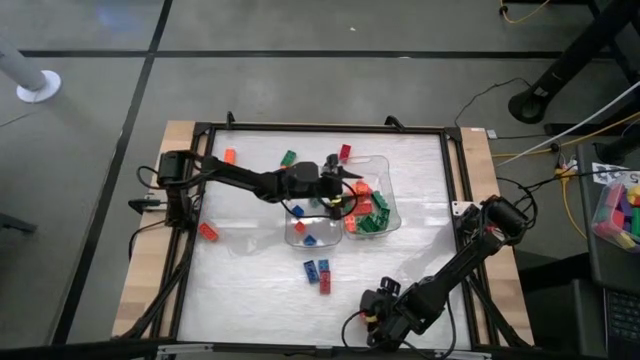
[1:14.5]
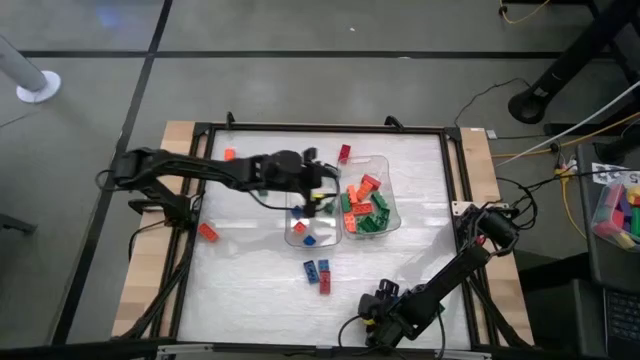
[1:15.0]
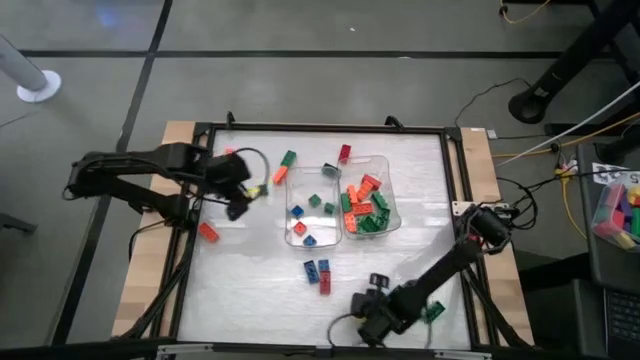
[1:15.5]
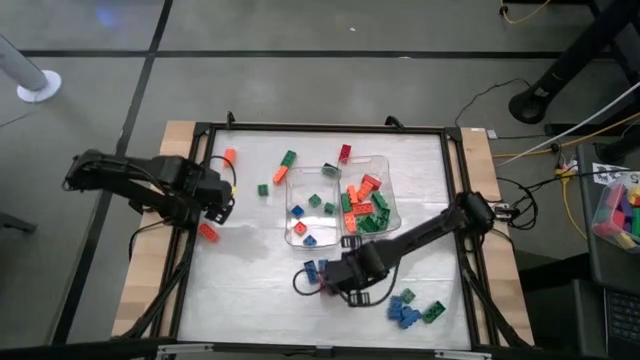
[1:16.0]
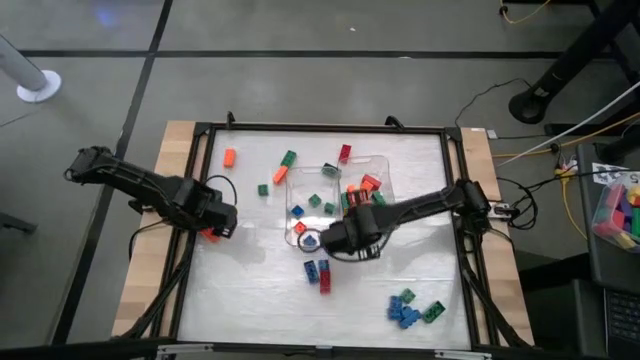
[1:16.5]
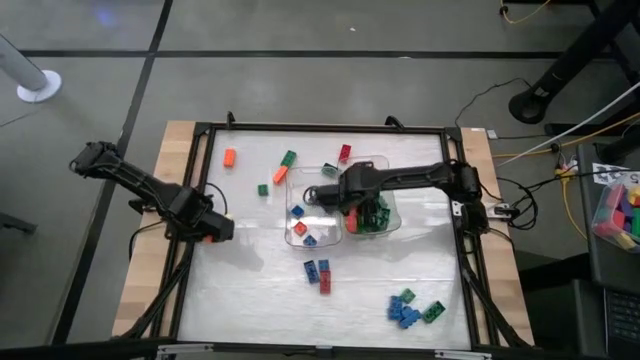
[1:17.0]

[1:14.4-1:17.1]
Task: Sort blocks by size
Put the orange rectangular game piece into the right transparent bin

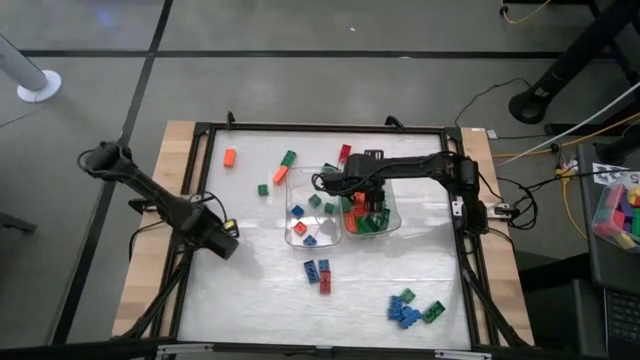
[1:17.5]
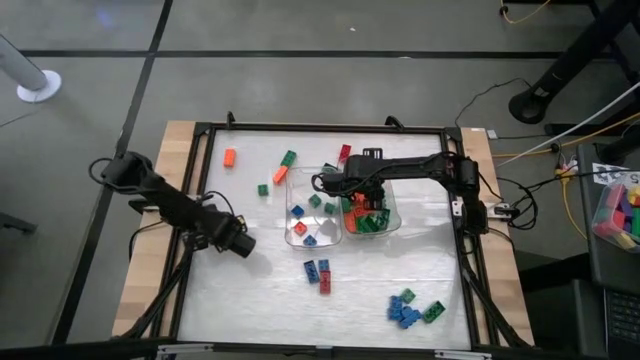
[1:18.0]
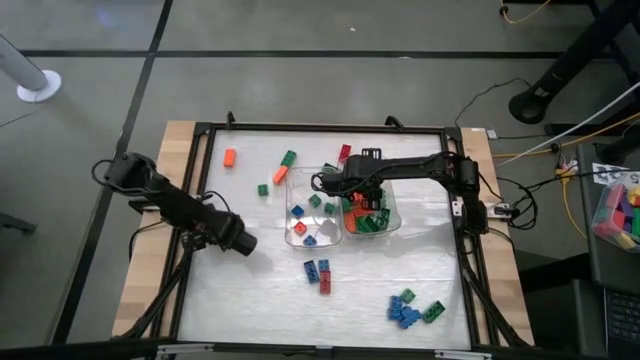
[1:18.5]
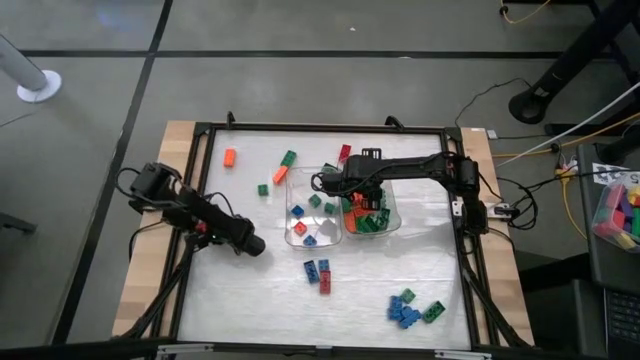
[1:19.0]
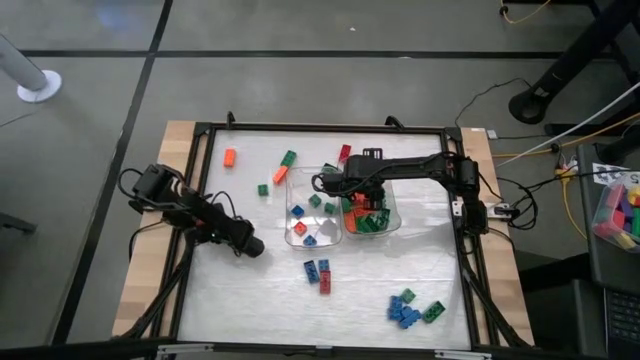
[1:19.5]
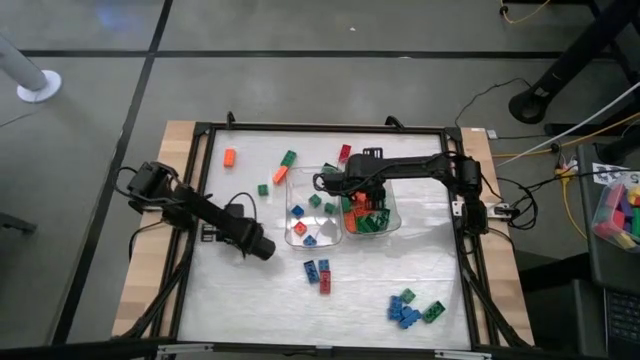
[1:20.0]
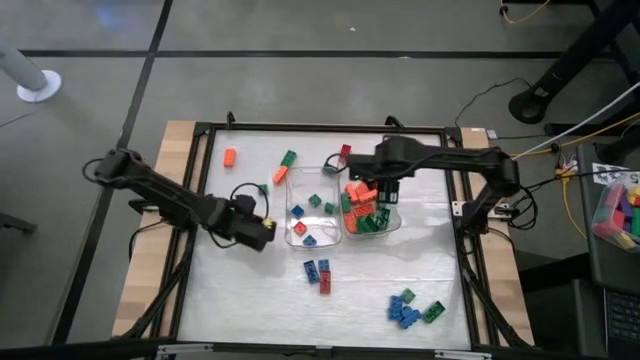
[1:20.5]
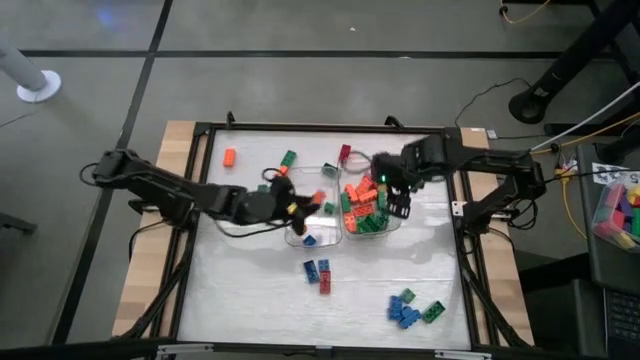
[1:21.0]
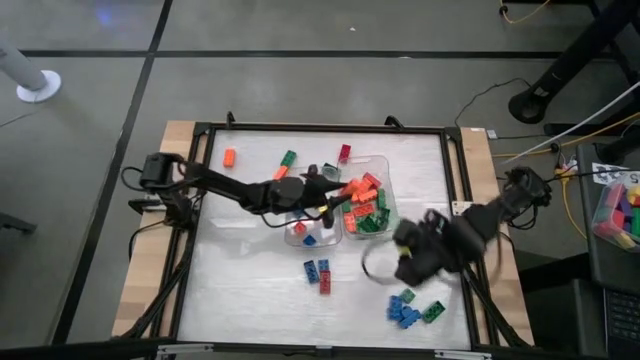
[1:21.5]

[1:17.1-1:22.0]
Put the orange rectangular game piece into the right transparent bin

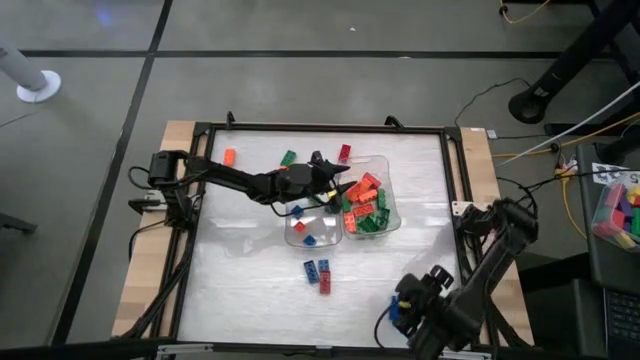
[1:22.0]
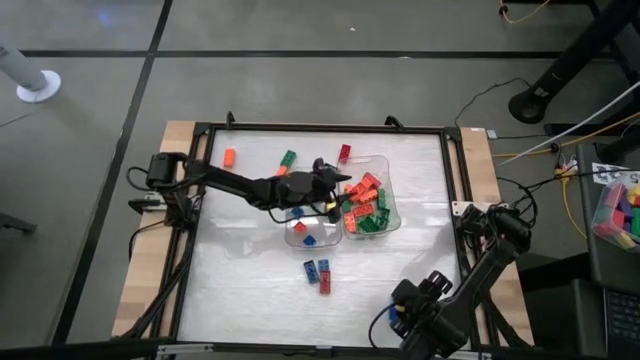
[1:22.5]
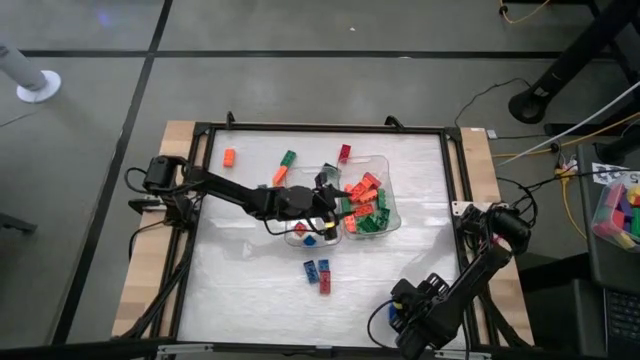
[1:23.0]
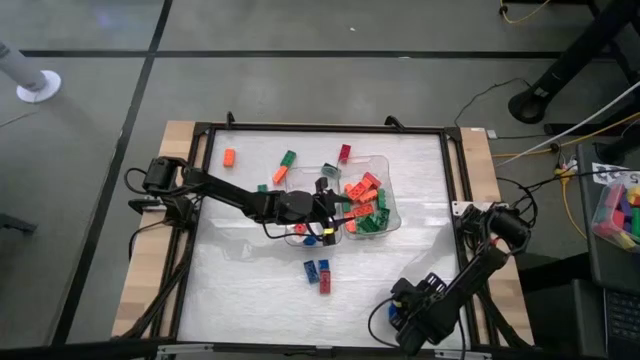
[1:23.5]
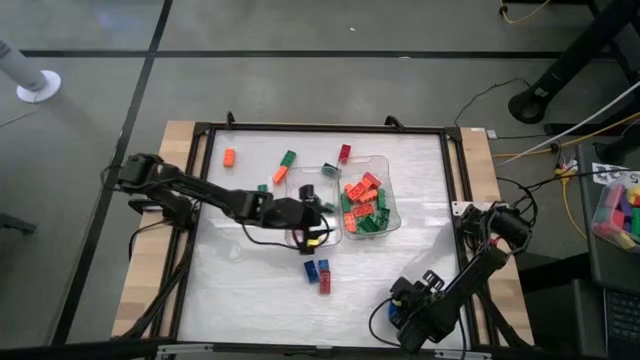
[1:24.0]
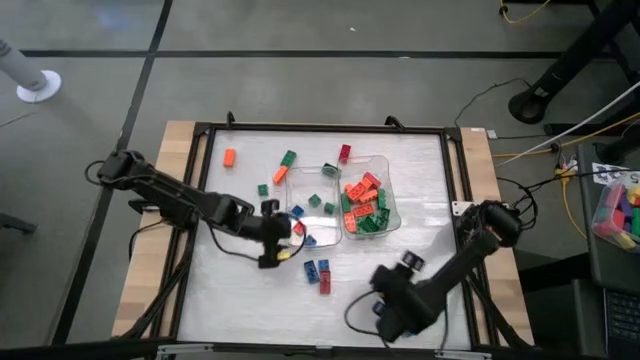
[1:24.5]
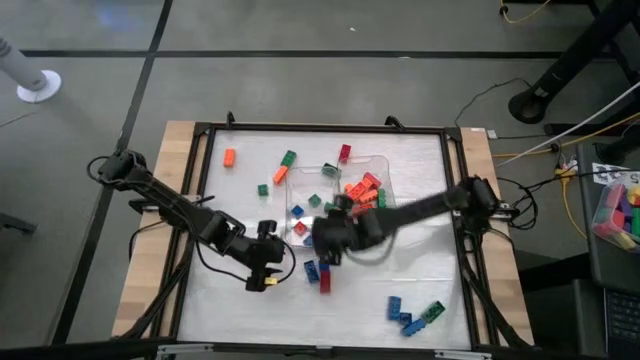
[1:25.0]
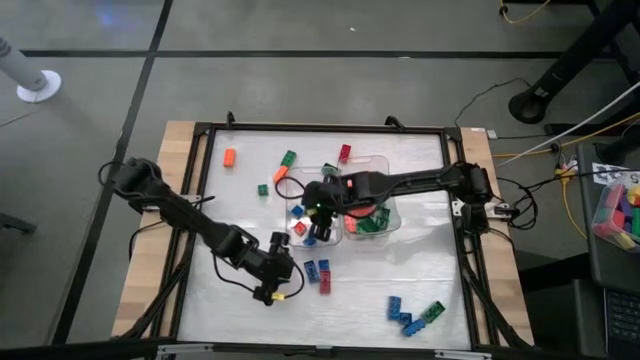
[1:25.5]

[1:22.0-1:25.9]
Put the green square game piece into the left transparent bin

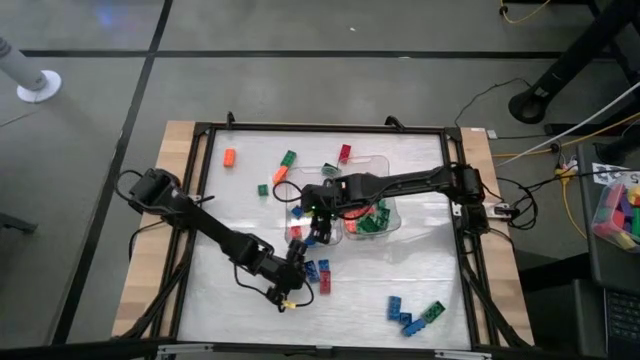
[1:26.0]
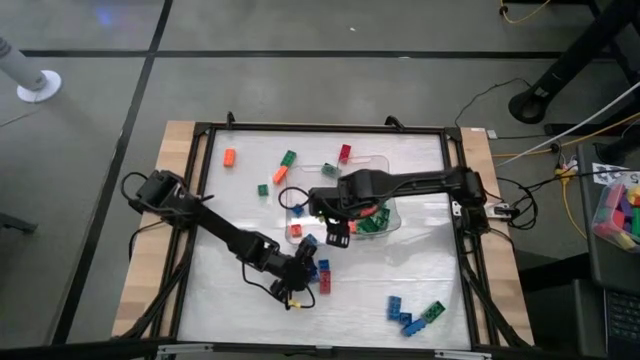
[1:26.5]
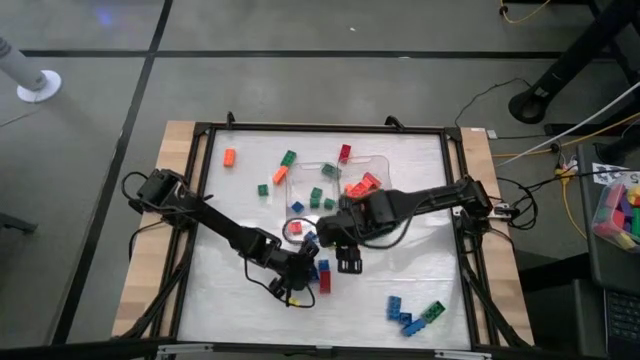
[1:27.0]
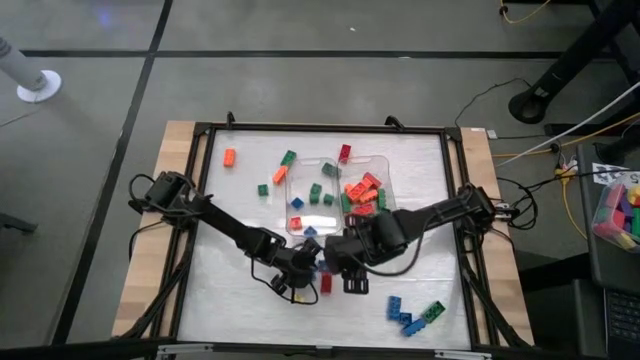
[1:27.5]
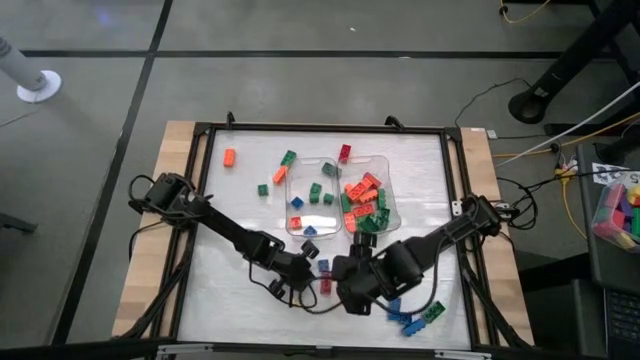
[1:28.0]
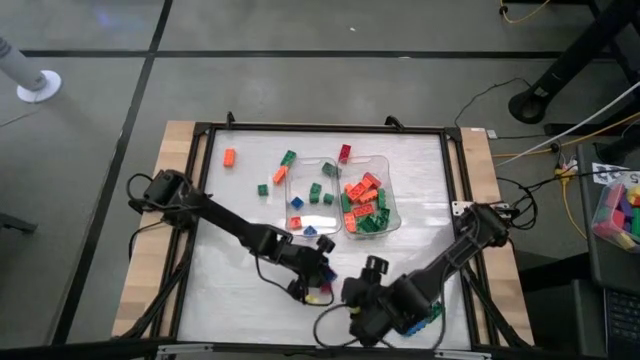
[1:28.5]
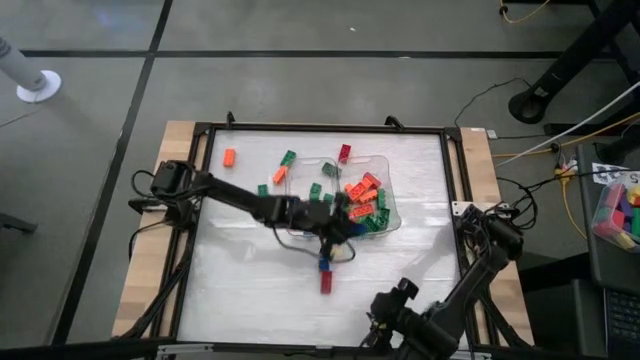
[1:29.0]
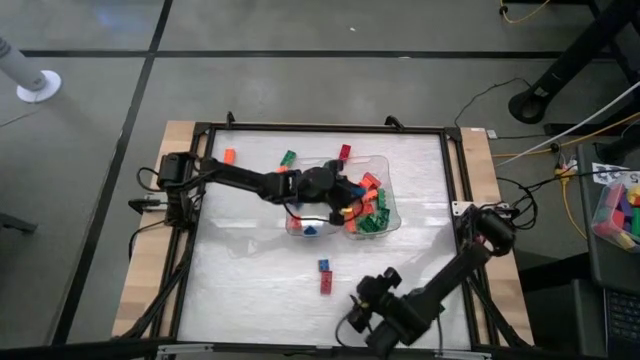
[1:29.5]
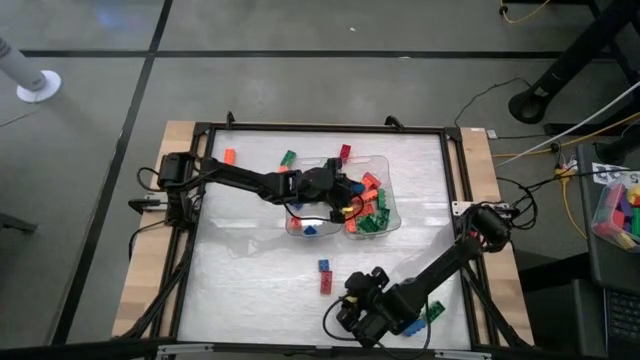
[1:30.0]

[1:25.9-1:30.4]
Put the blue rectangular game piece into the right transparent bin

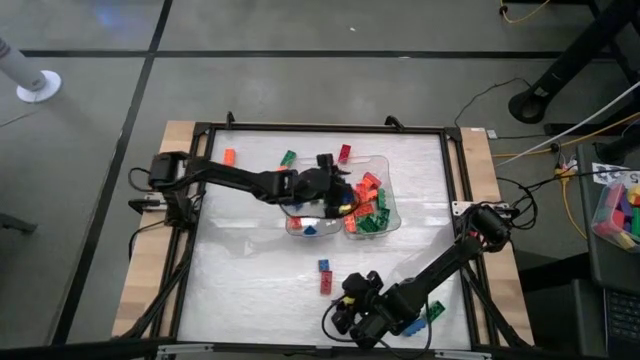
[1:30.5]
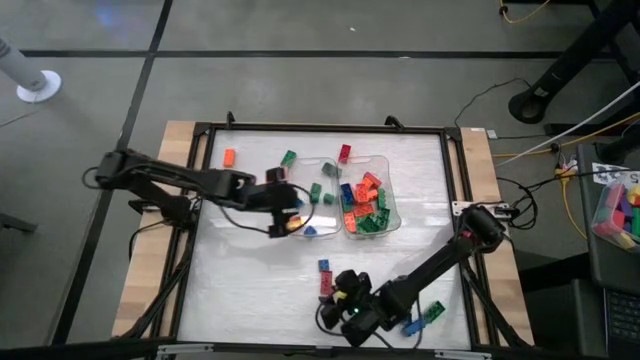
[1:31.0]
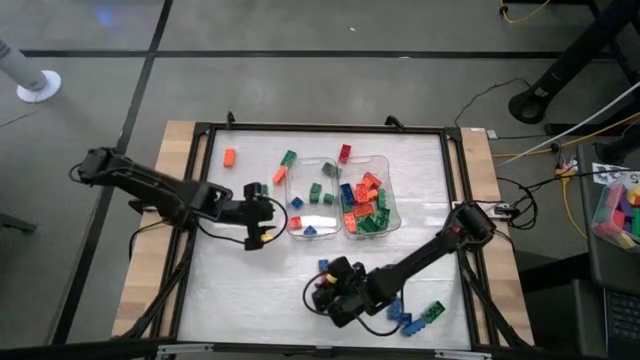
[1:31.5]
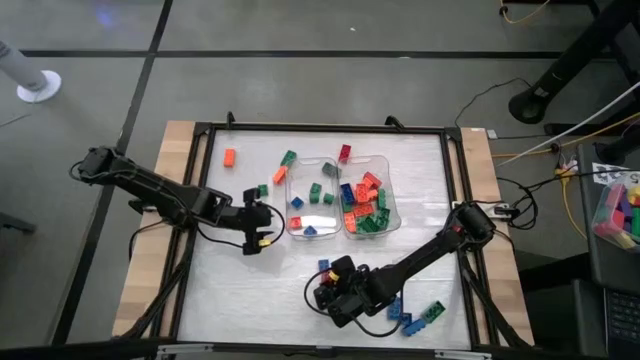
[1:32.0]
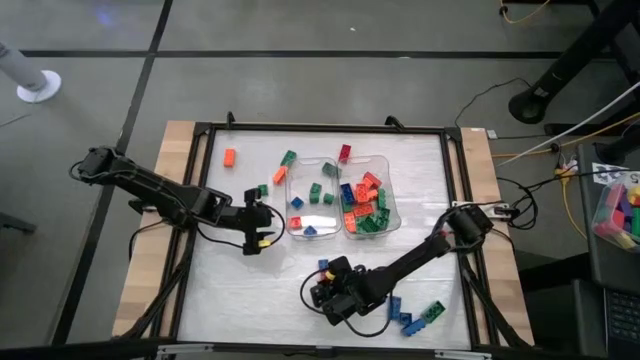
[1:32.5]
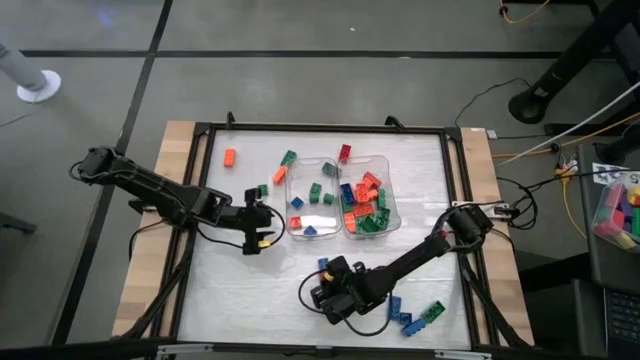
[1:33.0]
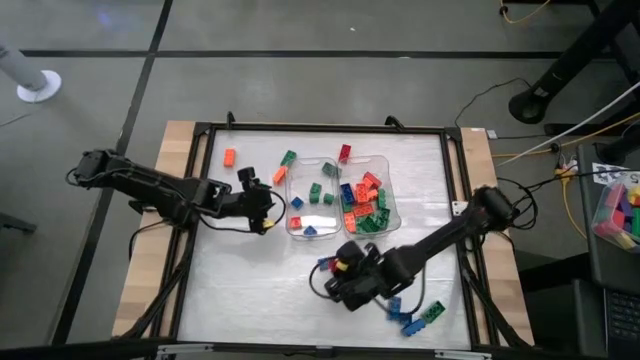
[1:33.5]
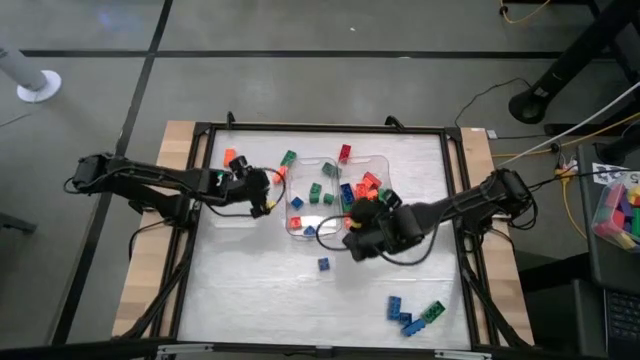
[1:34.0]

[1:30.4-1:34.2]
Put the red rectangular game piece into the right transparent bin
